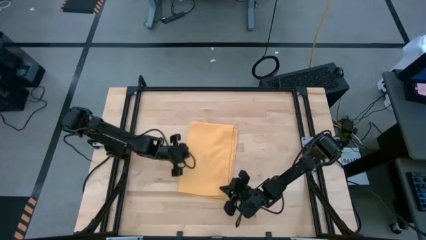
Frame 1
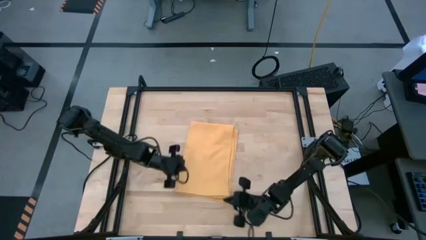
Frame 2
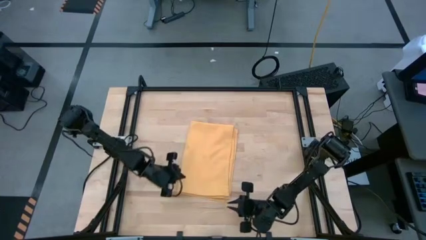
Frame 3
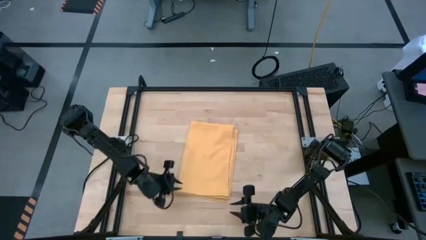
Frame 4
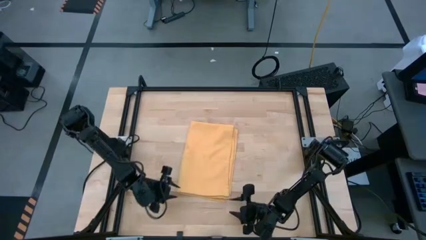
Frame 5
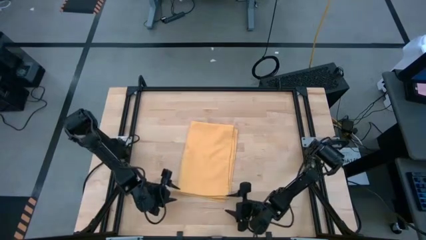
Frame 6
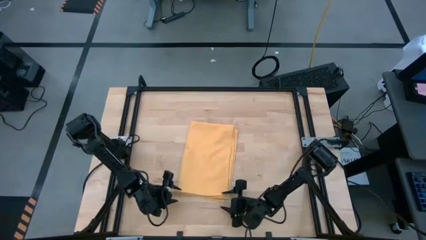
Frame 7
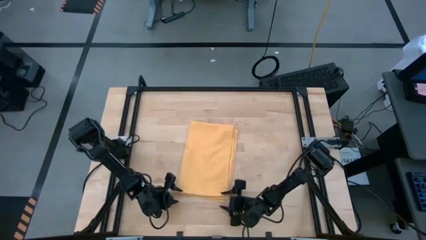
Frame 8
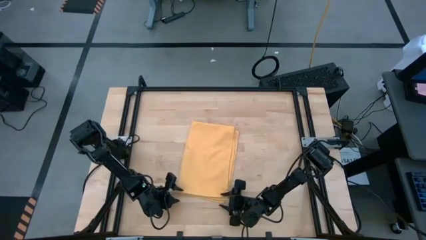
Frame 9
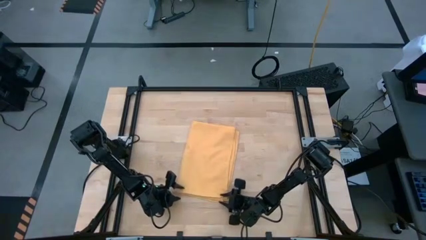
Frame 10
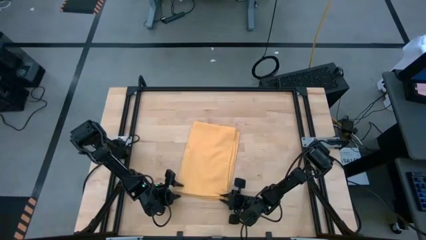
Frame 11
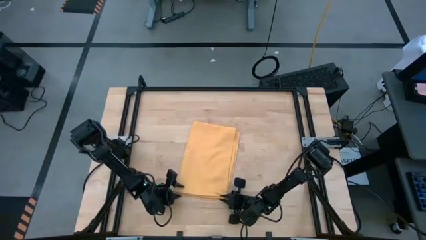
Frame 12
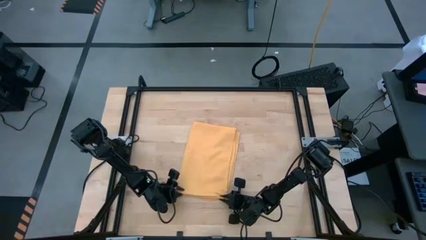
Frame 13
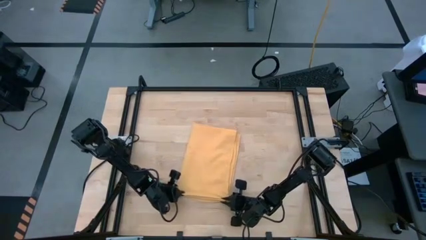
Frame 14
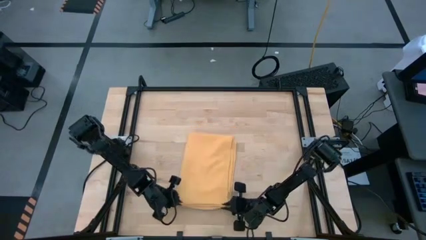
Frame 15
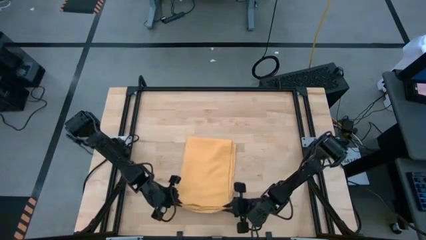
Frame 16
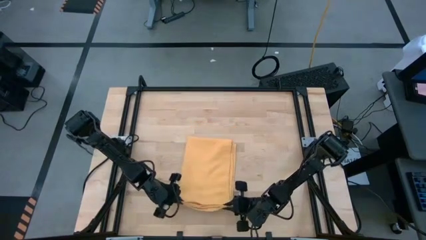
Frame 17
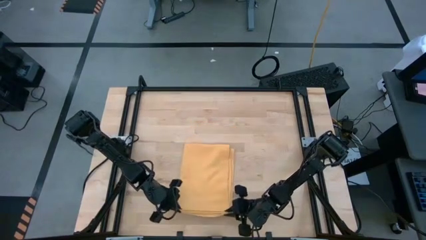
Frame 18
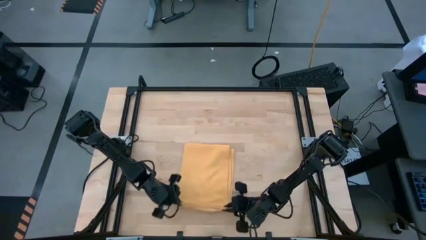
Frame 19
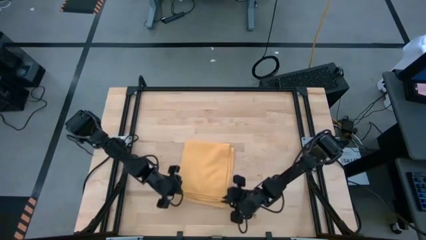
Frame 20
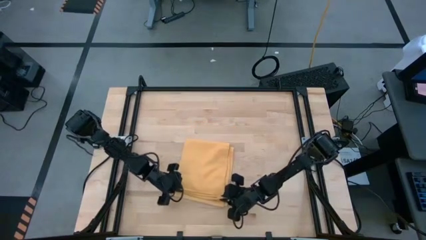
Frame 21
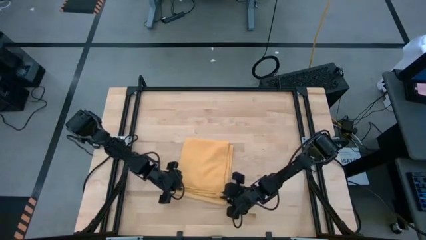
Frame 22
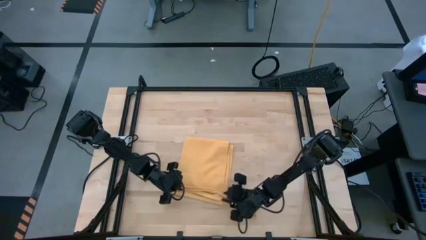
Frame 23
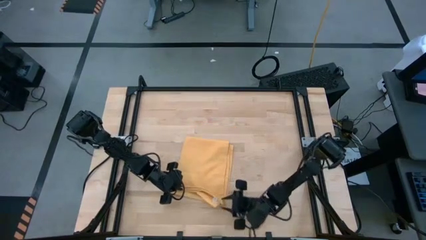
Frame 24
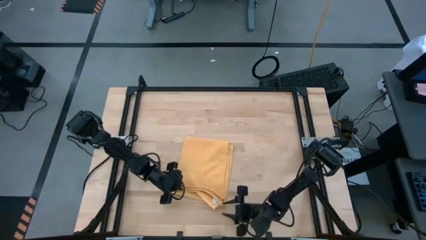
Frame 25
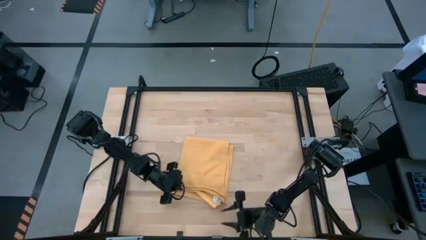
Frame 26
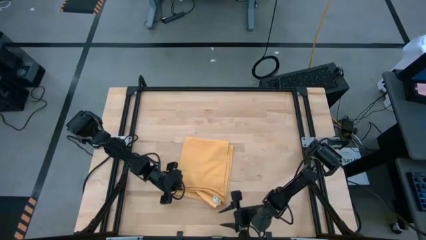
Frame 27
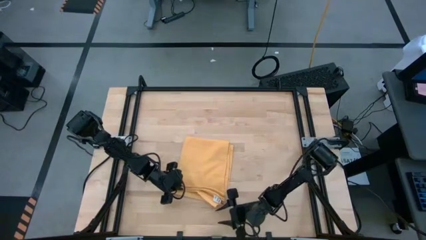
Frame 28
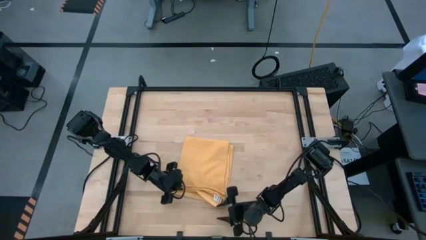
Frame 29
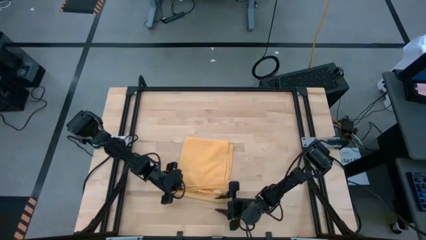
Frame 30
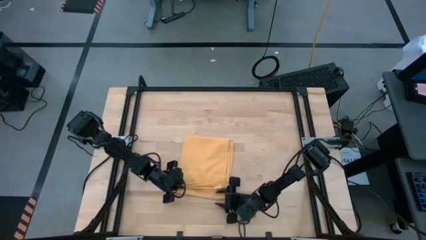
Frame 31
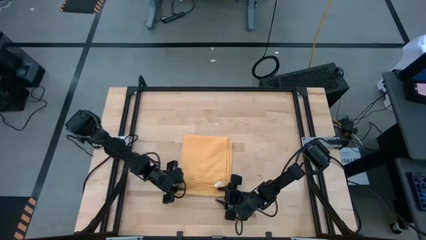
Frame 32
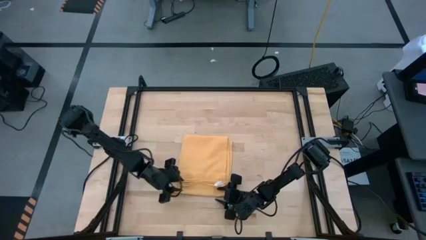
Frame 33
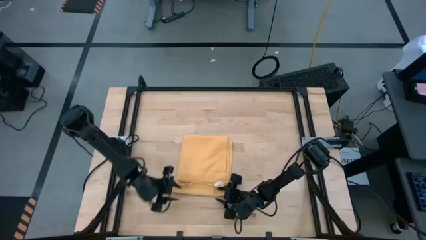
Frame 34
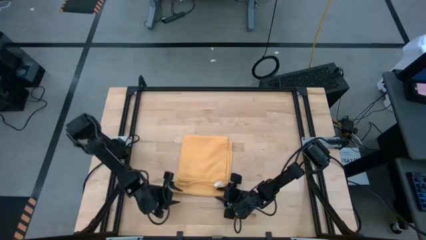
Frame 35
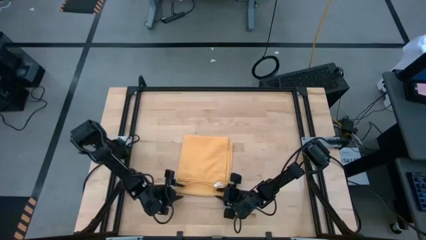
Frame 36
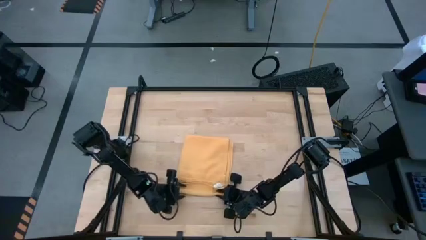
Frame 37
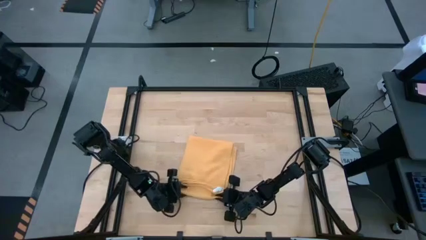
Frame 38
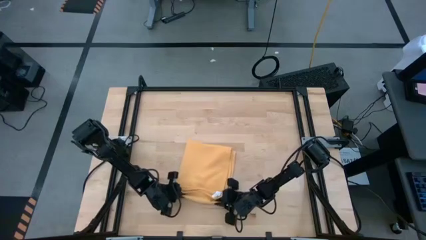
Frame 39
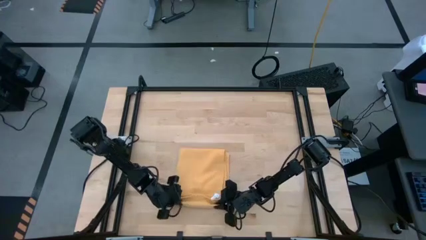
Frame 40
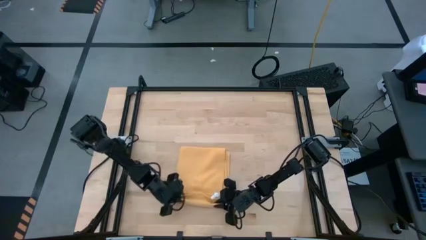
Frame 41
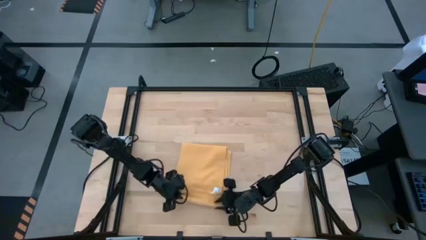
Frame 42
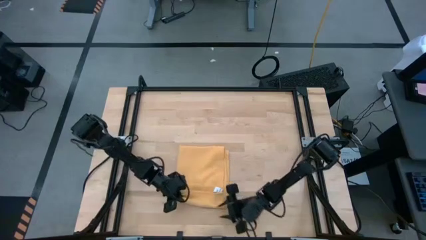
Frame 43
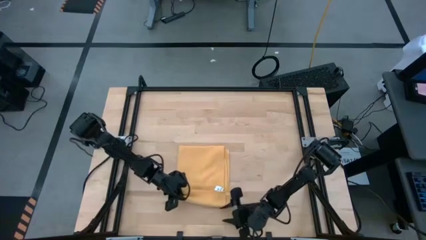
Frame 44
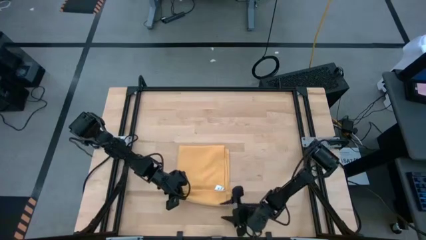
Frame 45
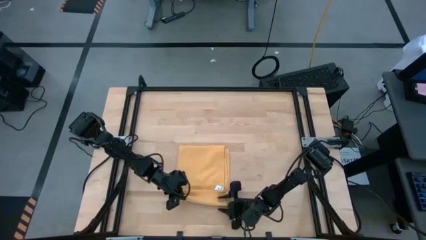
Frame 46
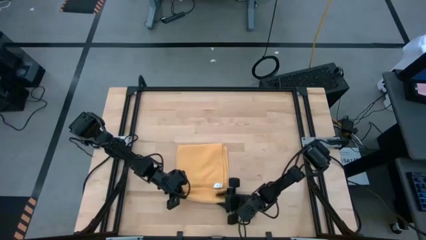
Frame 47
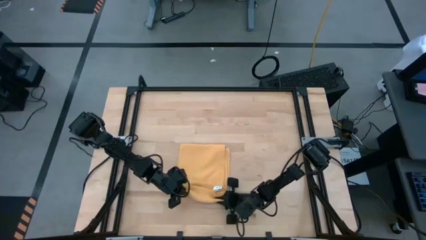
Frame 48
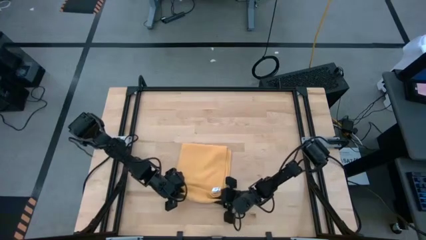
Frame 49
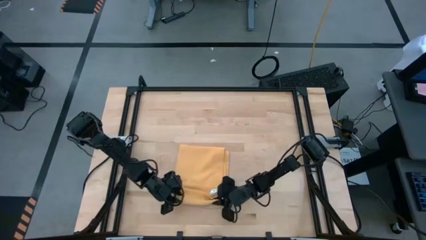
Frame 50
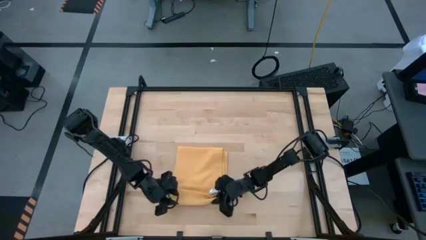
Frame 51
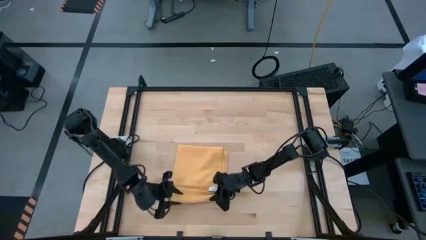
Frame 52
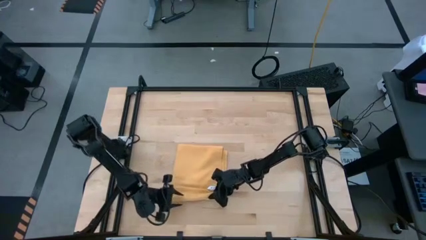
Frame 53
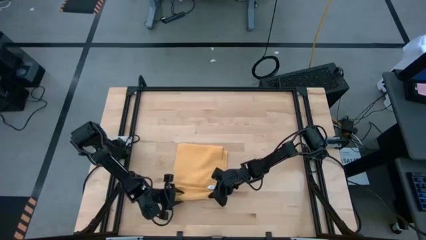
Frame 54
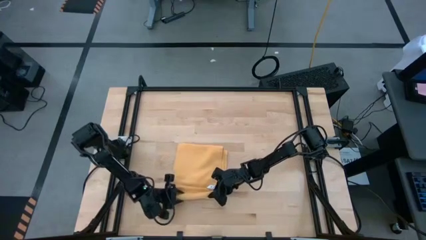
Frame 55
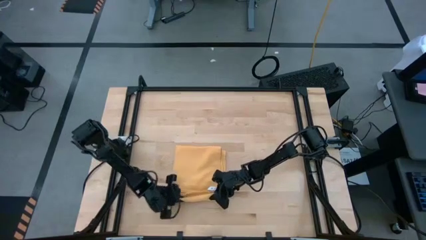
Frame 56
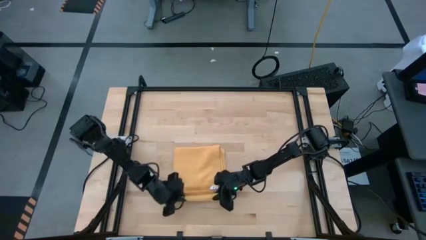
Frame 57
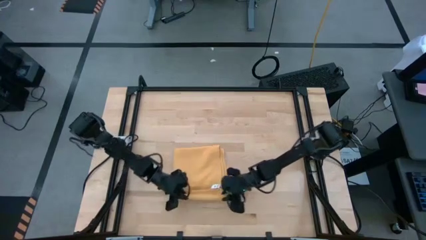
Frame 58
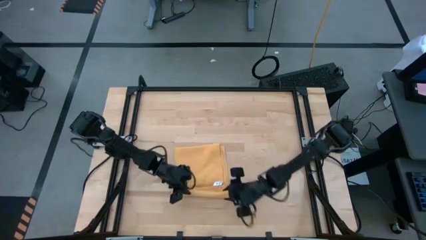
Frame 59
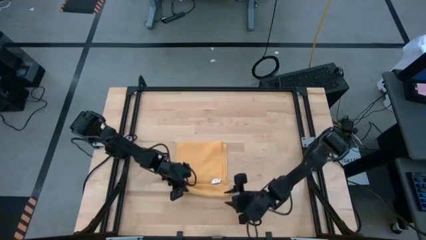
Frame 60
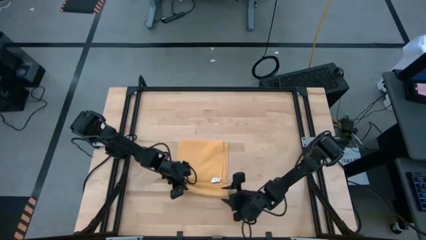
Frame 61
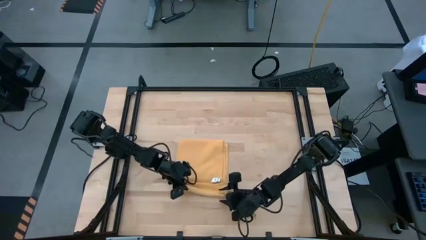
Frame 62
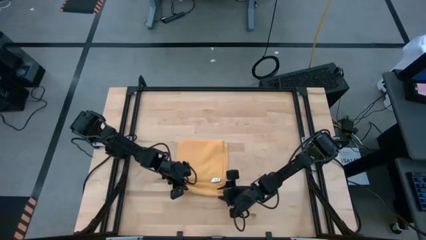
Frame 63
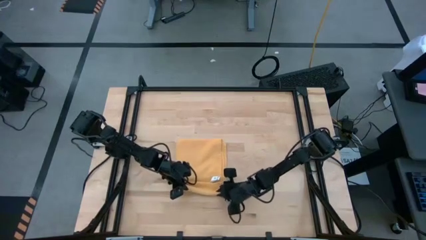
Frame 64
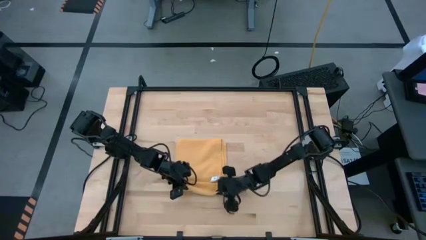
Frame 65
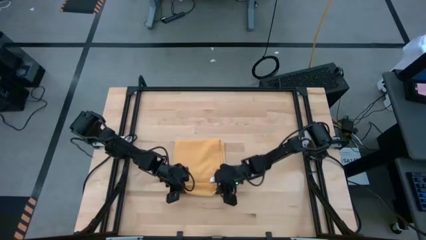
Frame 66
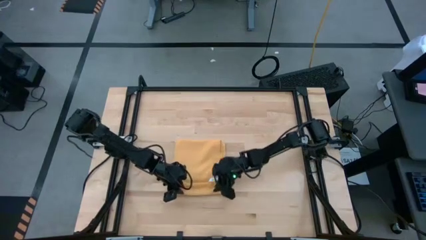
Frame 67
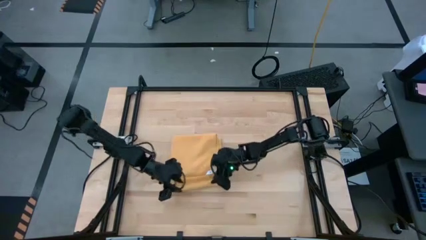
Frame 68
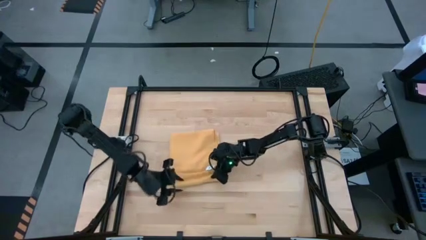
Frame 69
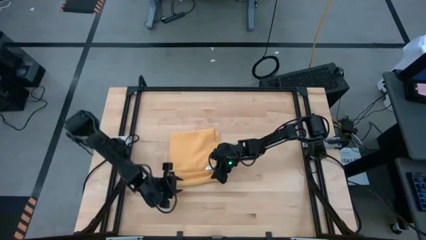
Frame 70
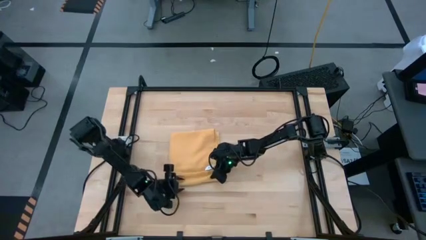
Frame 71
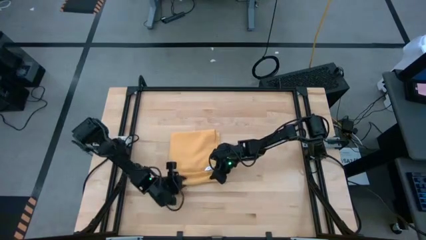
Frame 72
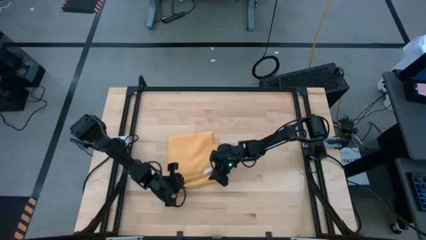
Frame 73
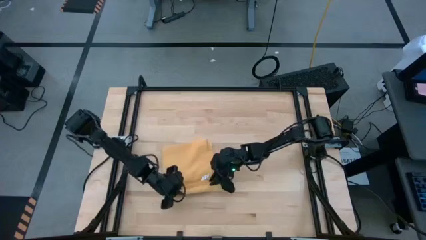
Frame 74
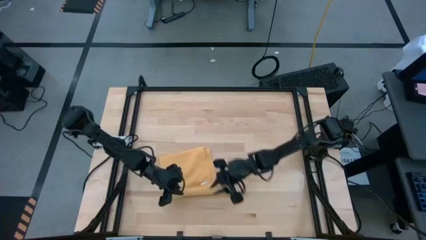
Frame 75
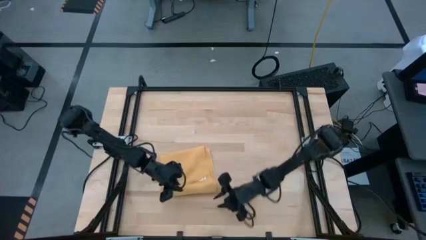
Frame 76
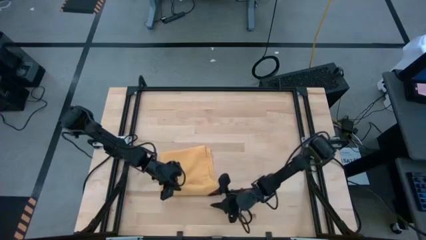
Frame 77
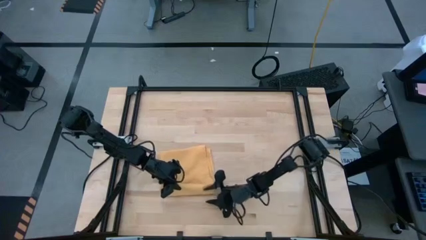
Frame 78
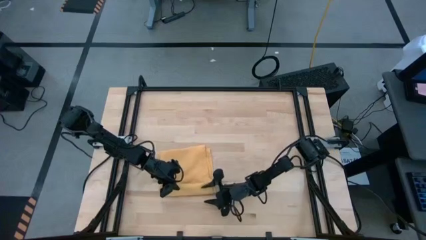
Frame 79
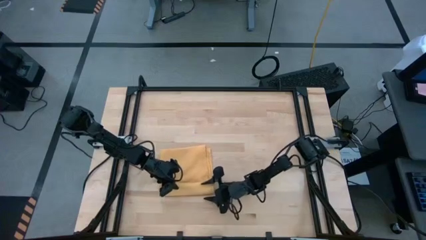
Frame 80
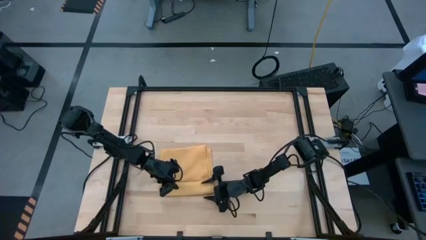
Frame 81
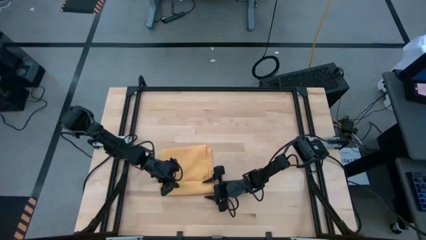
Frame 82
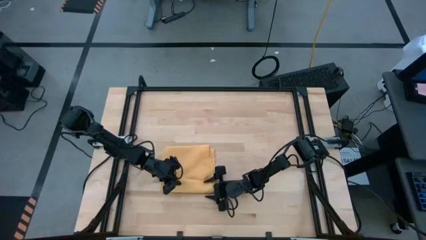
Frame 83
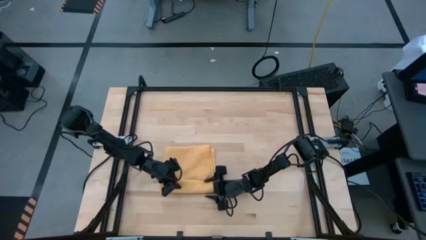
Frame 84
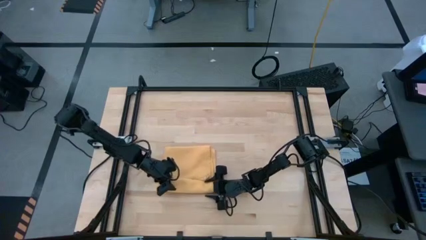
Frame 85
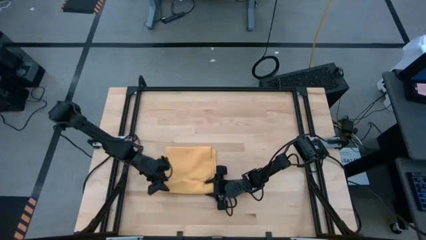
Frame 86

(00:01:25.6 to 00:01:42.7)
Task: Roll towel
Roll the yellow towel
